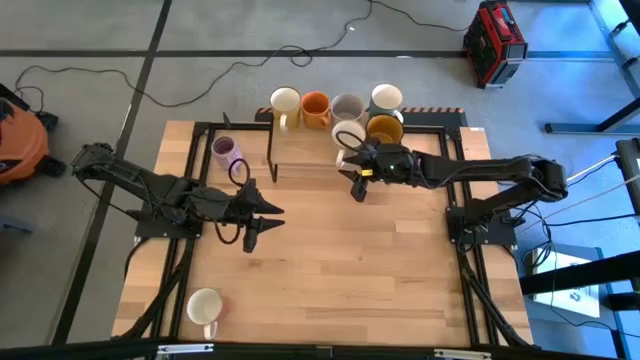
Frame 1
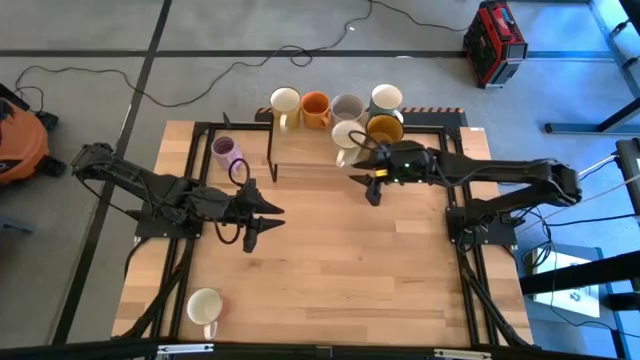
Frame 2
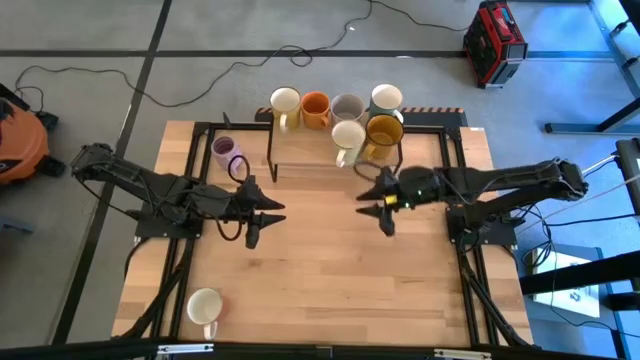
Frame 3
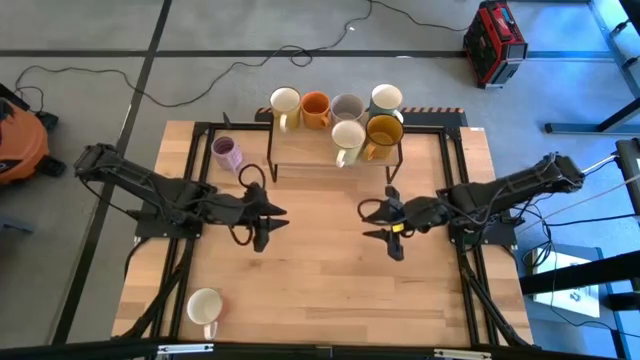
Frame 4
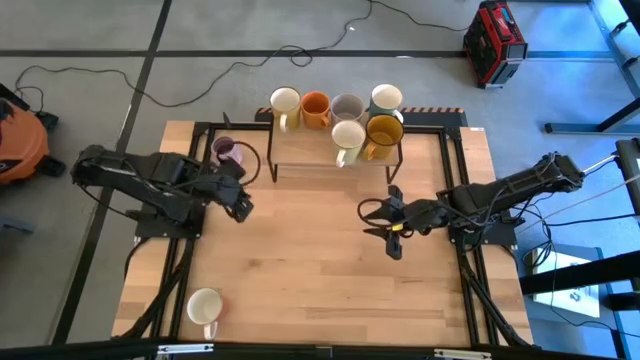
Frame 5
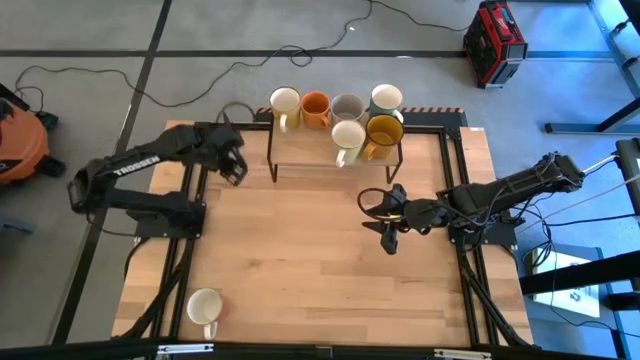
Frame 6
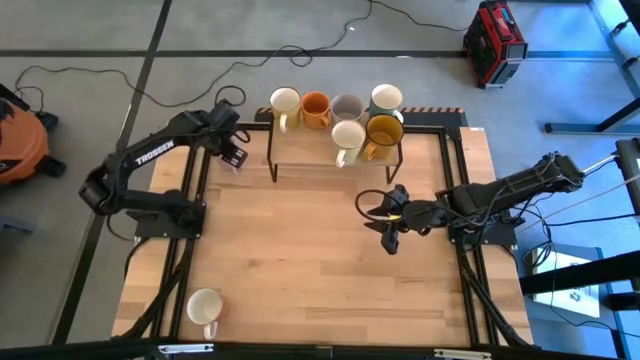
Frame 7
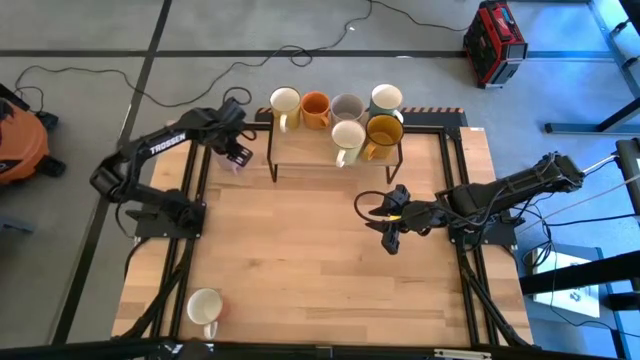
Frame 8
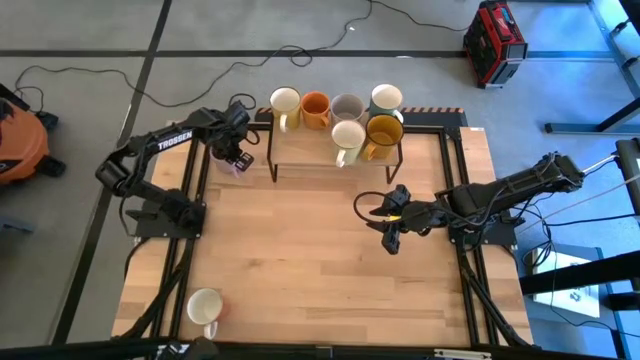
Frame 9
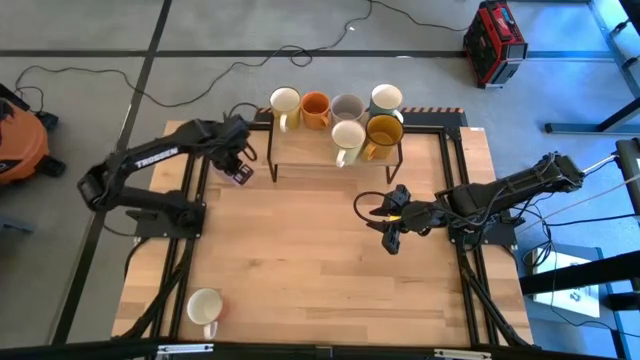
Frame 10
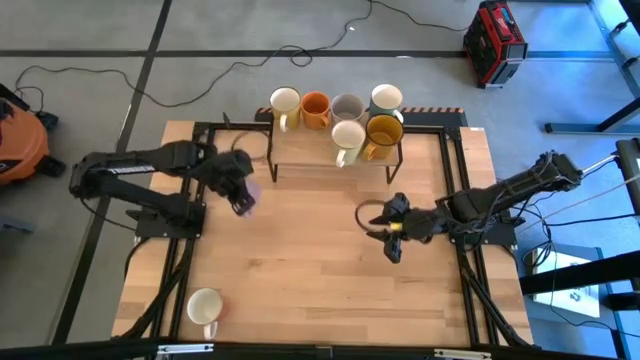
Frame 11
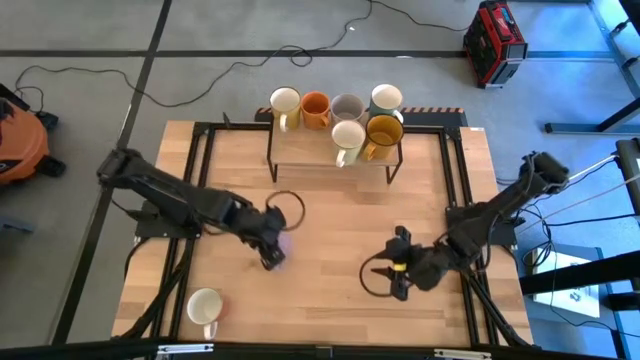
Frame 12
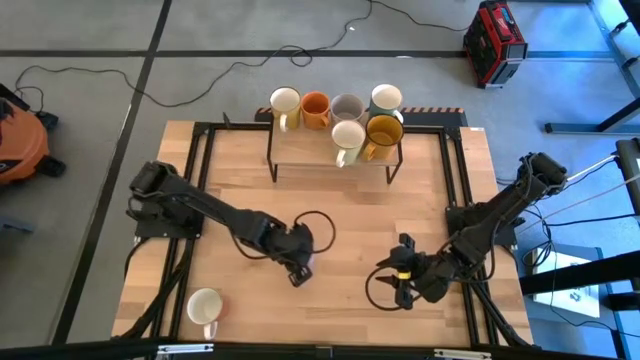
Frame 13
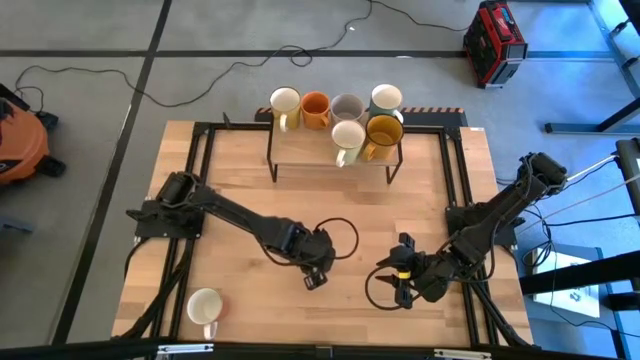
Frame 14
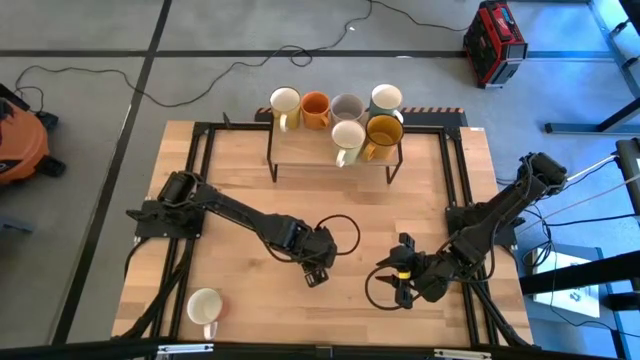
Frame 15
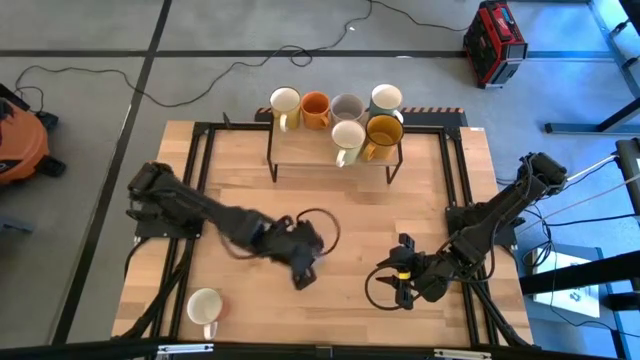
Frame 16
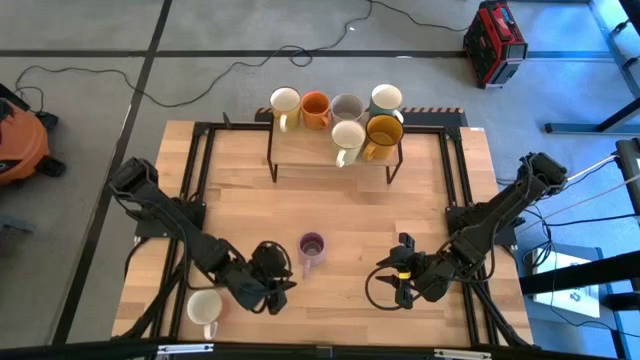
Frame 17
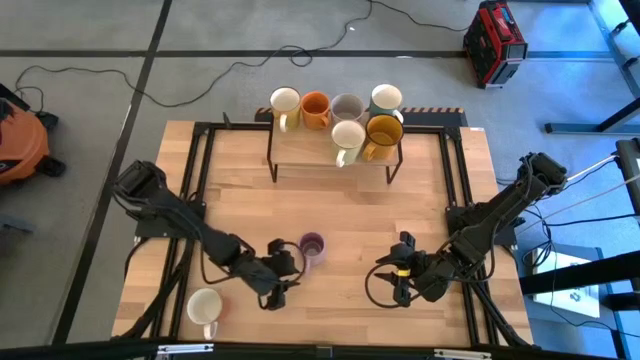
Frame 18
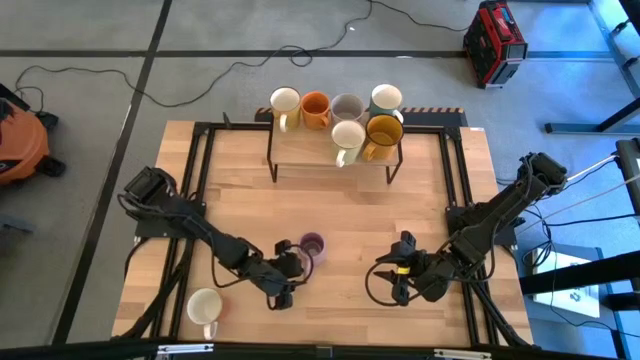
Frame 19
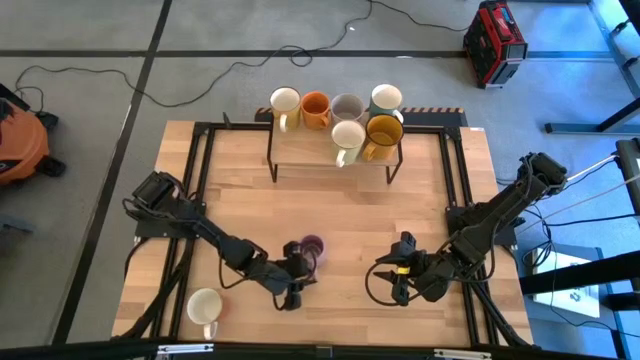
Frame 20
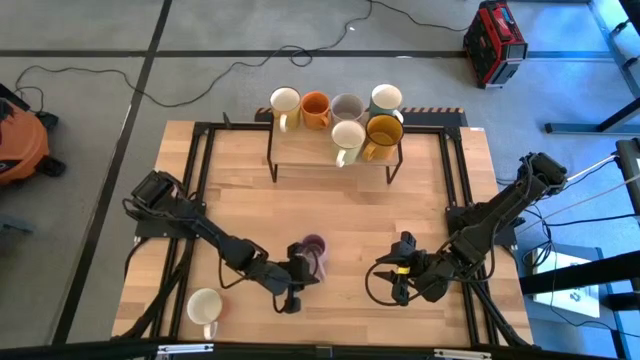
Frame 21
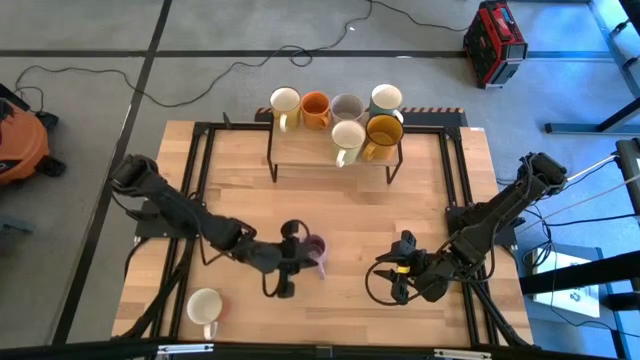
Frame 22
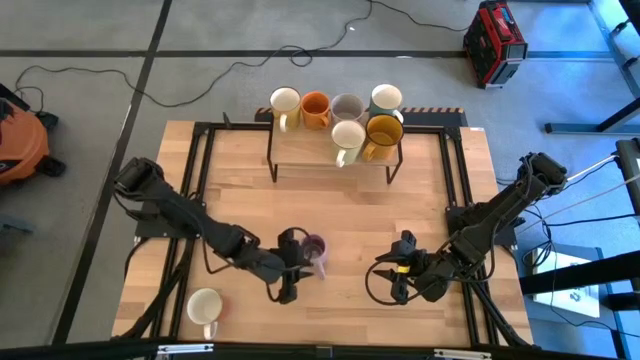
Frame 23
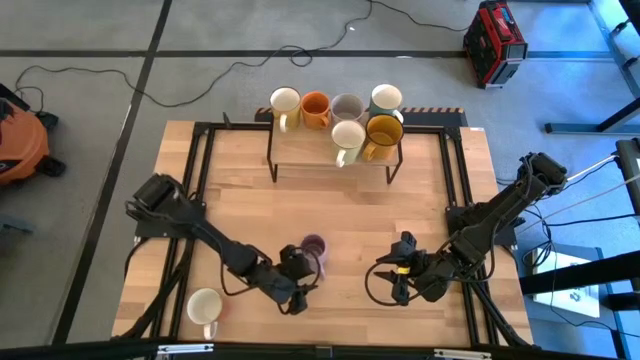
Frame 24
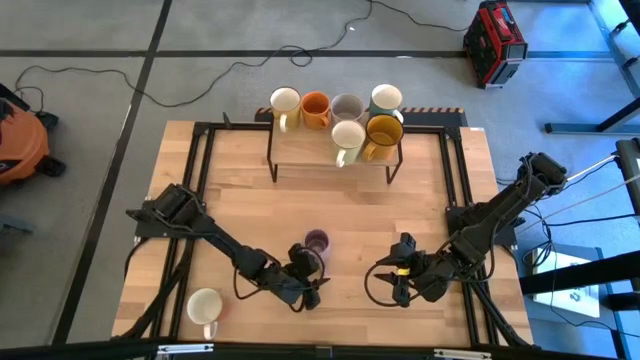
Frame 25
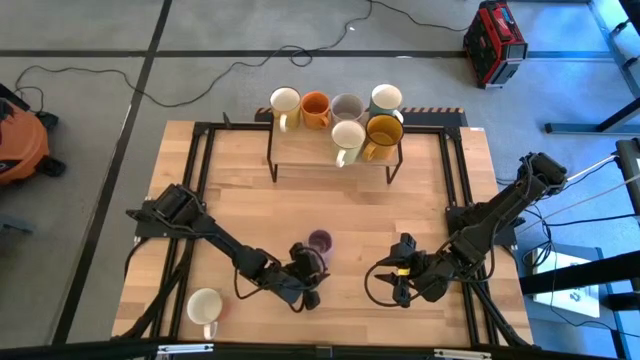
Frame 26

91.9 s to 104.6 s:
Task: Place coffee mugs
Put the purple mug on the shelf

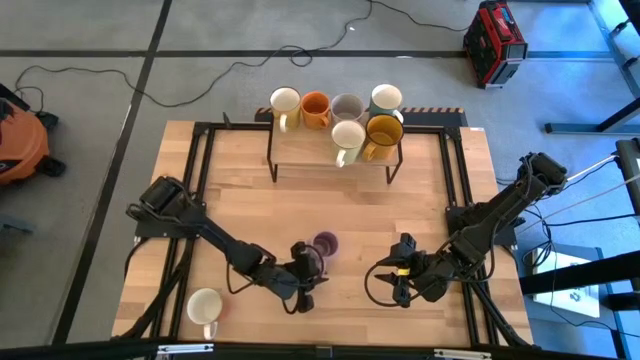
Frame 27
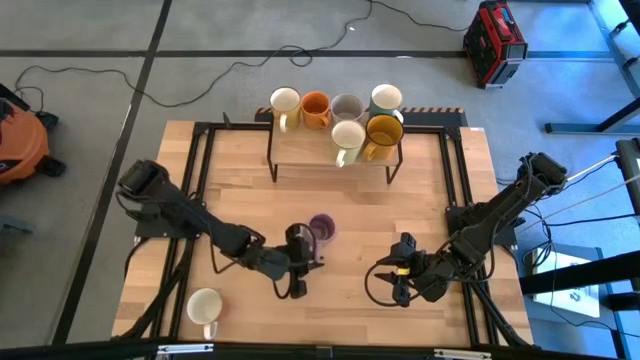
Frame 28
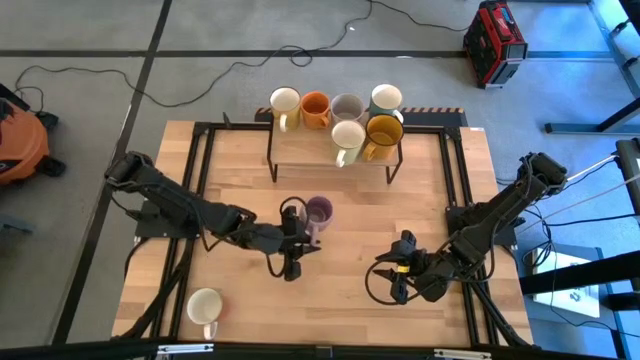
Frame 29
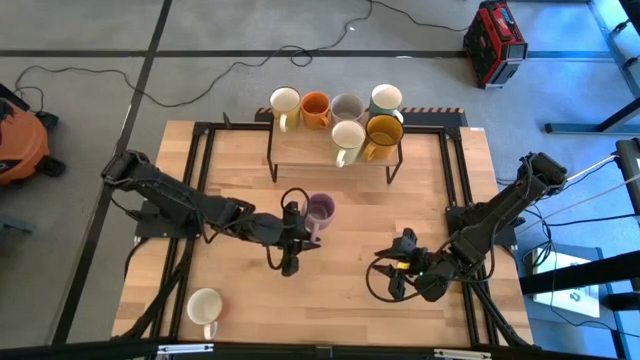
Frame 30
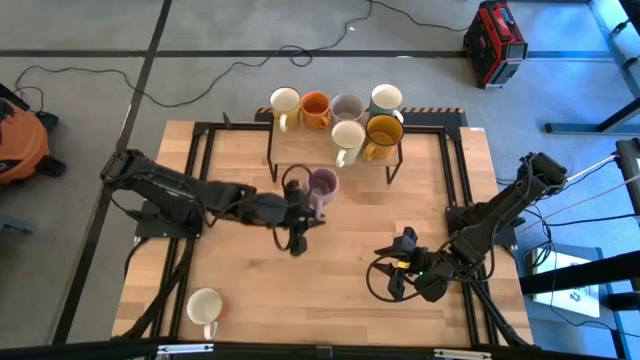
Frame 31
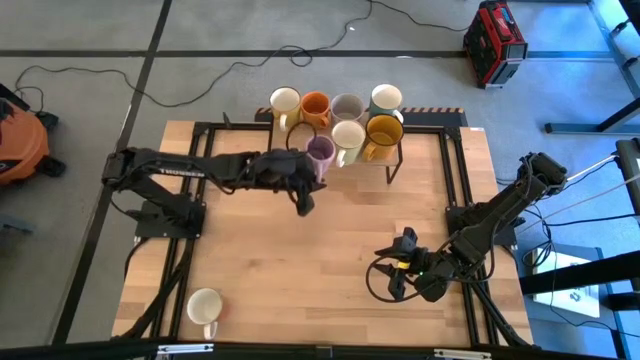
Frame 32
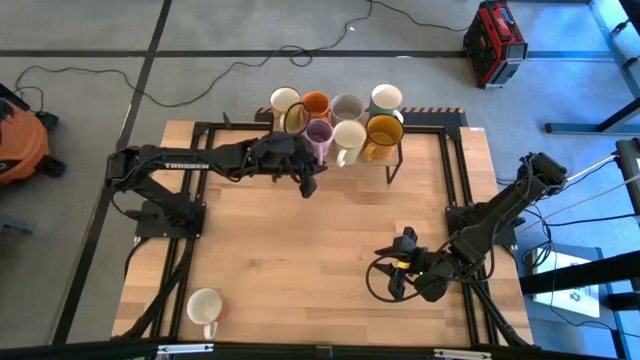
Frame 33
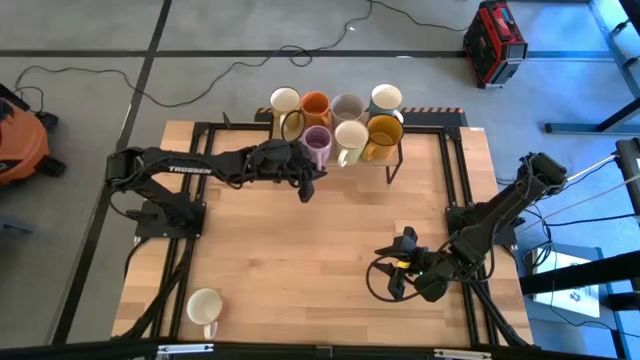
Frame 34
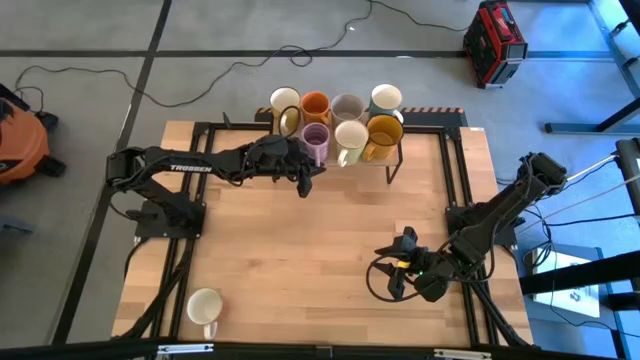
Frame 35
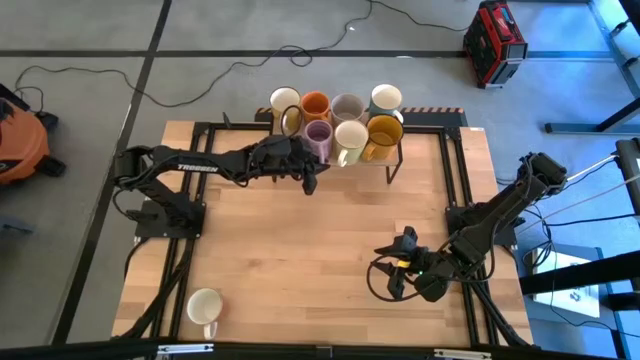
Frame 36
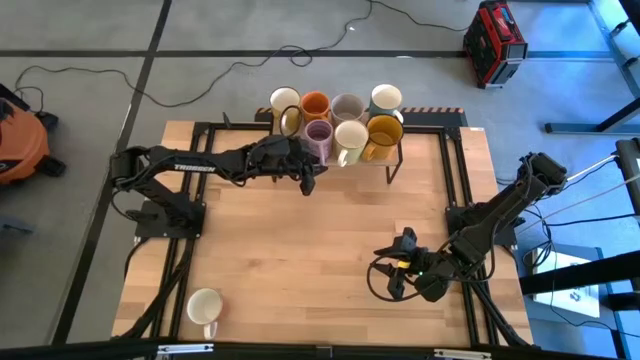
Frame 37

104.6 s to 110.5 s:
Put the purple mug on the shelf

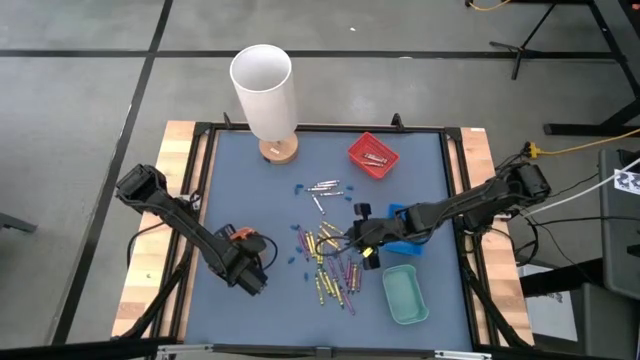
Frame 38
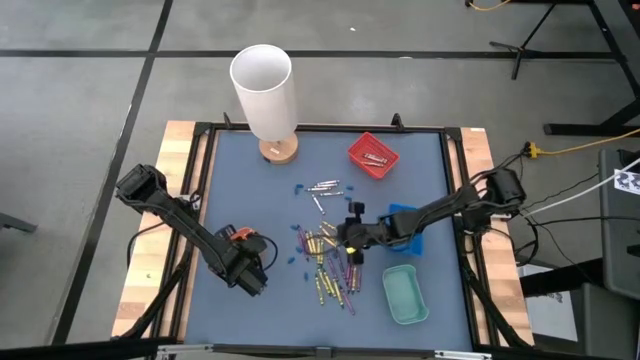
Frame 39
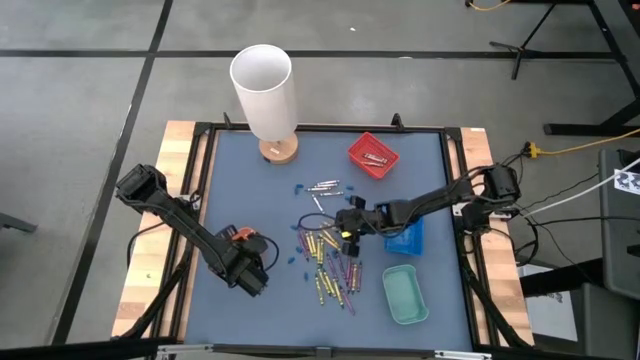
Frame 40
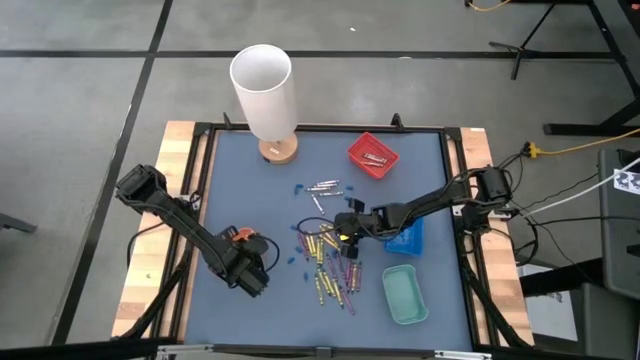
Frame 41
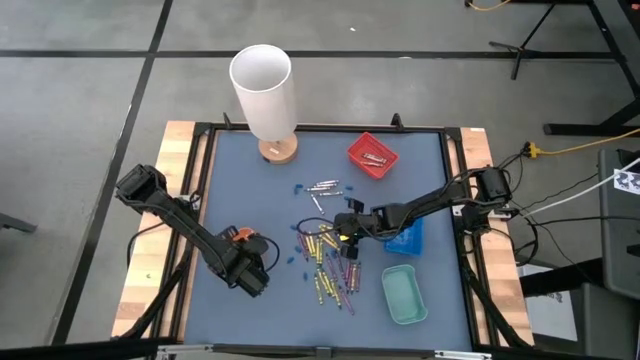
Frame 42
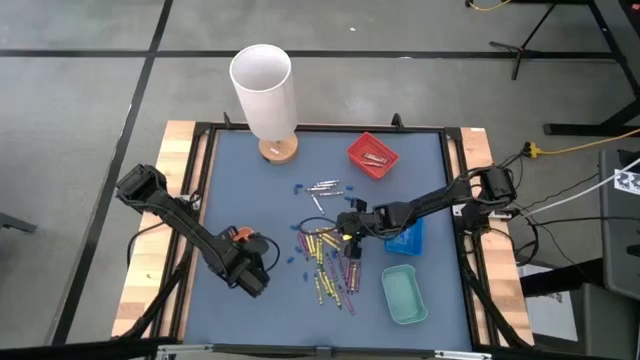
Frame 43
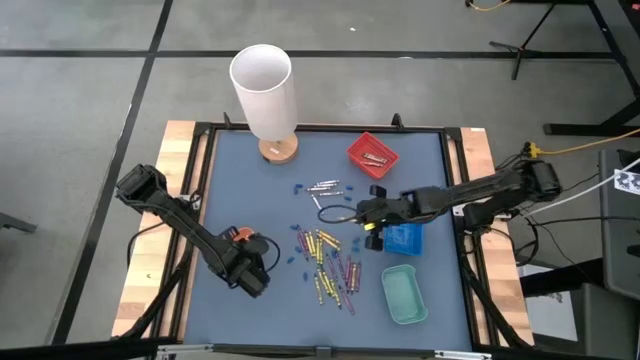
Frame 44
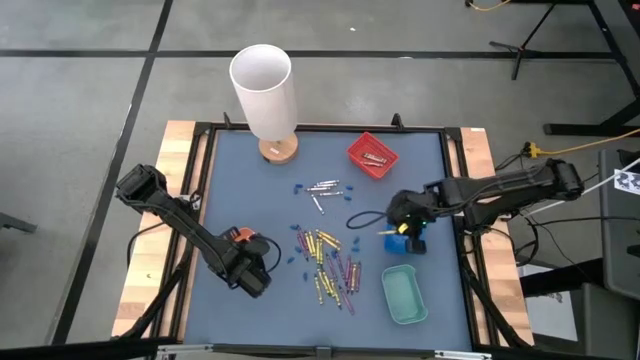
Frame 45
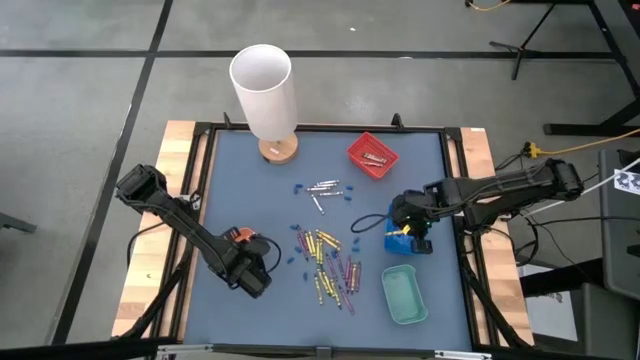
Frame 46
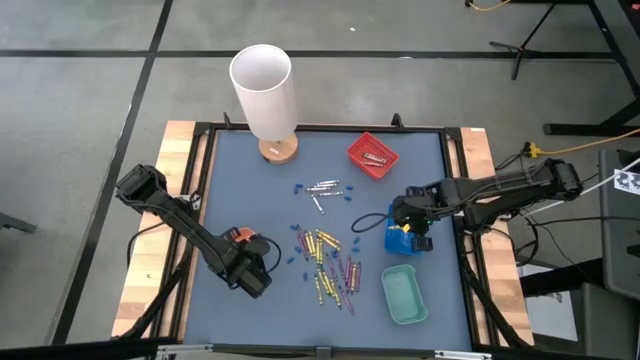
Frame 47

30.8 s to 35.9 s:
Task: Sort crayons
Put the yellow crayon into the blue bin
